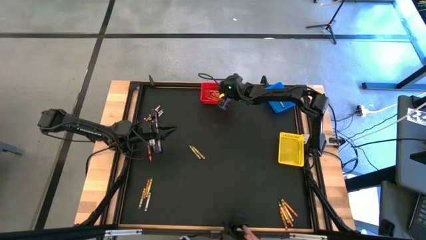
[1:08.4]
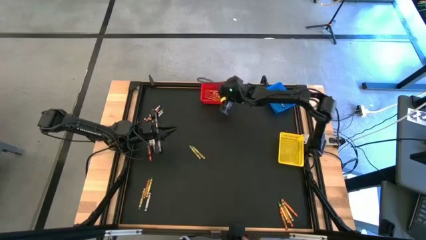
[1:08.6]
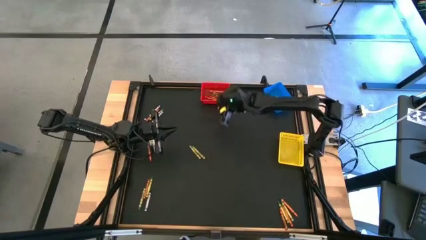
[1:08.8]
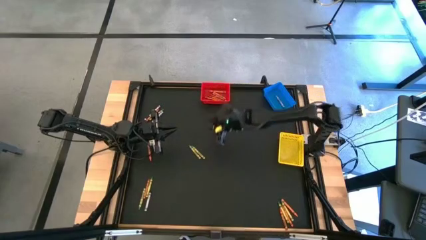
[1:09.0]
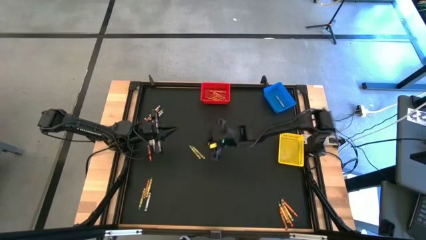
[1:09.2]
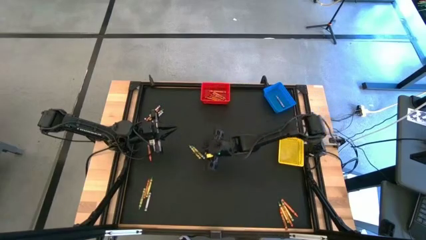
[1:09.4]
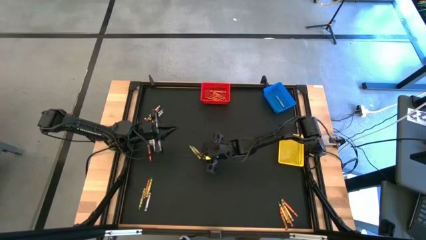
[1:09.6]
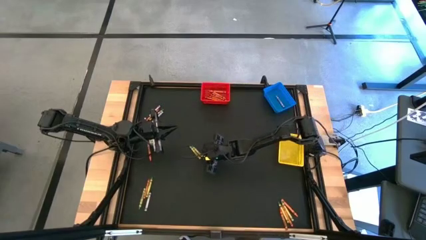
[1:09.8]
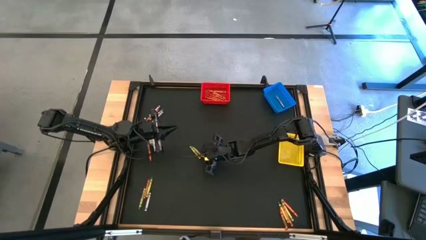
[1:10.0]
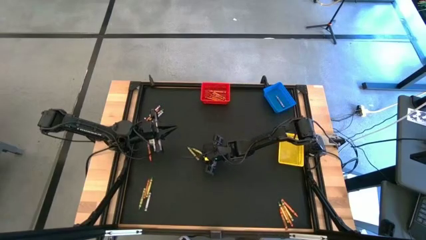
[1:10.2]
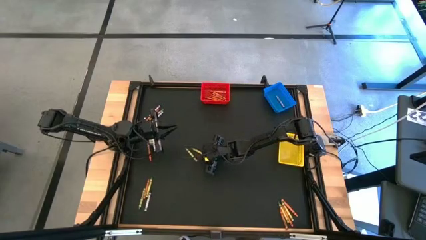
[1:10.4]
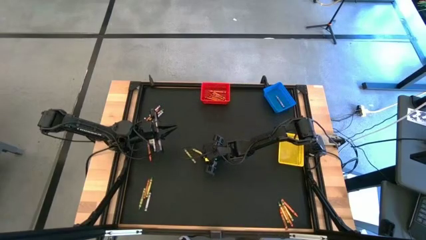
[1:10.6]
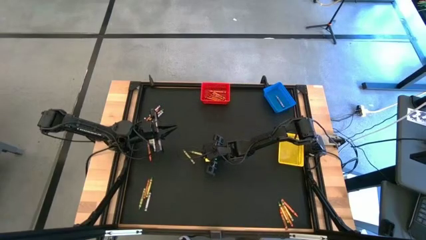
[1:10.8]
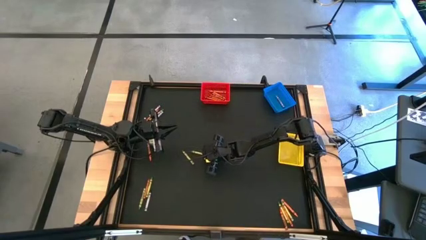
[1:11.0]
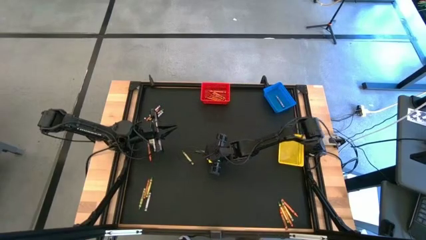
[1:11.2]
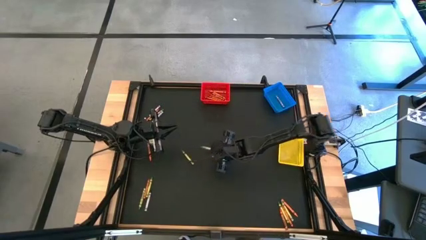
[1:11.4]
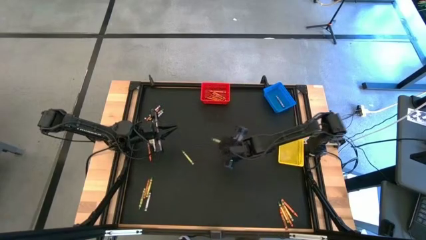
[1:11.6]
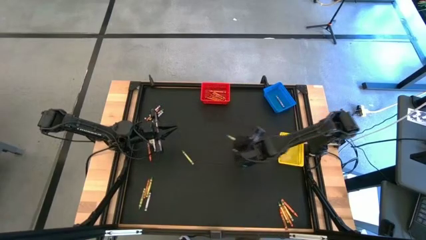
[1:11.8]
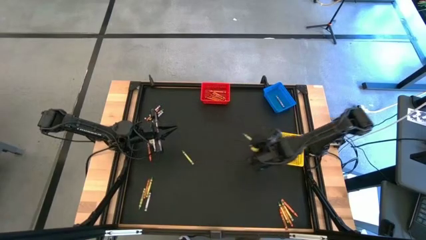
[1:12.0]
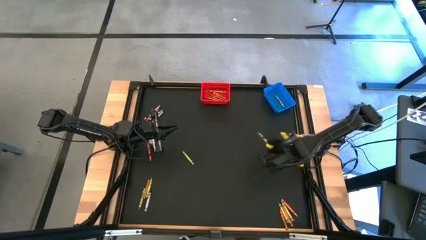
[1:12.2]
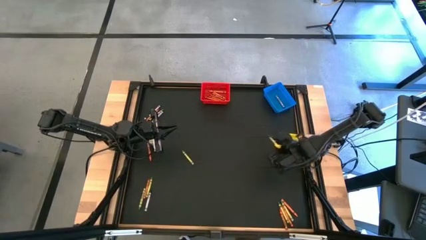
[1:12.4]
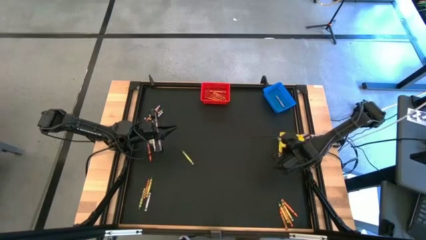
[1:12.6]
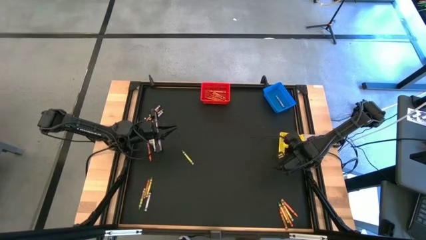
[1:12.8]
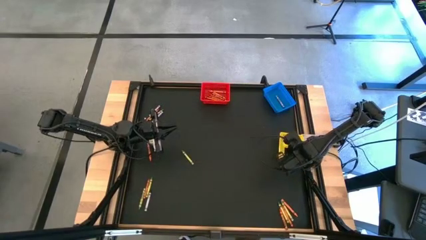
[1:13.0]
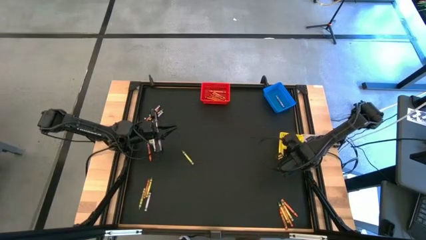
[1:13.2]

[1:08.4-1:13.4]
Task: Sort crayons
Put the green crayon into the yellow bin

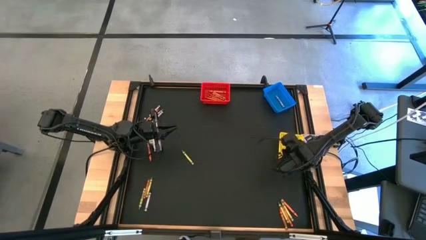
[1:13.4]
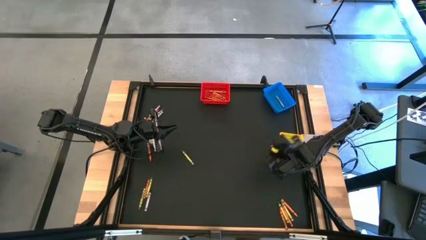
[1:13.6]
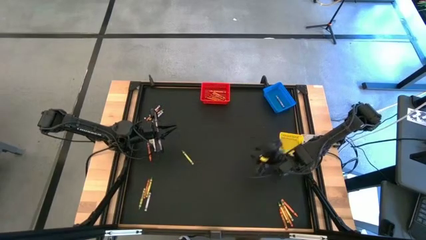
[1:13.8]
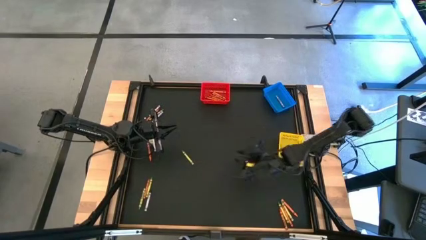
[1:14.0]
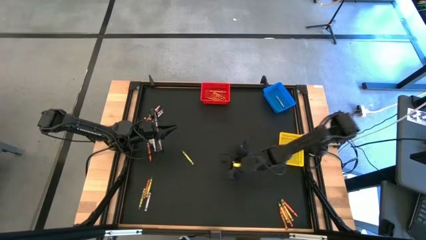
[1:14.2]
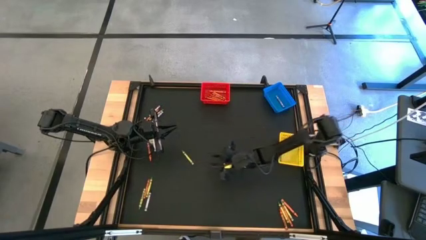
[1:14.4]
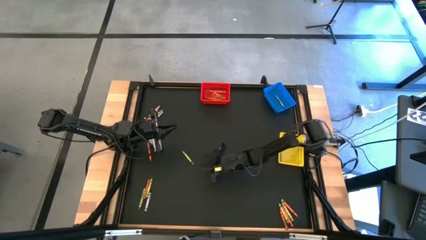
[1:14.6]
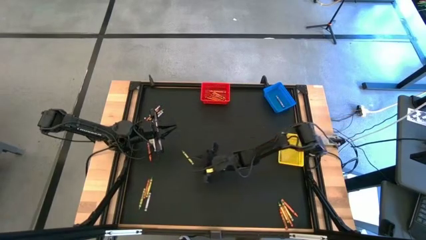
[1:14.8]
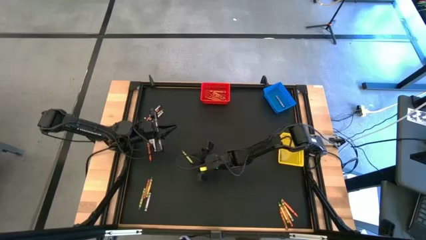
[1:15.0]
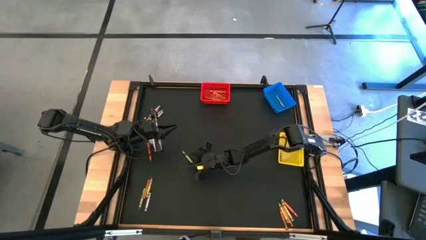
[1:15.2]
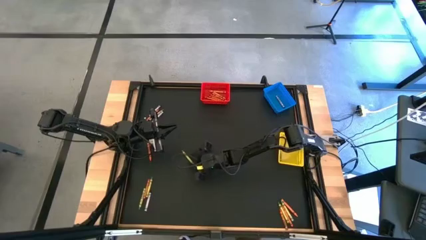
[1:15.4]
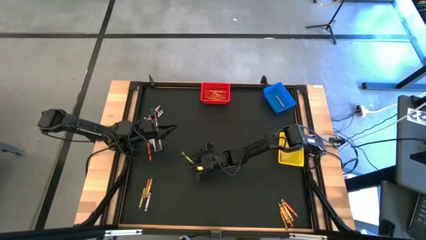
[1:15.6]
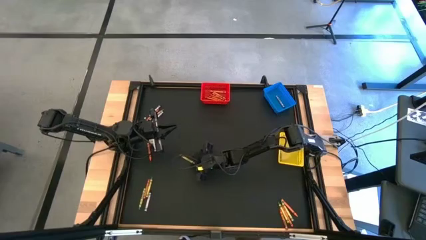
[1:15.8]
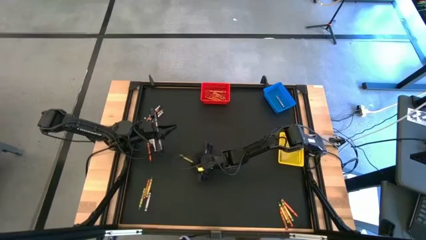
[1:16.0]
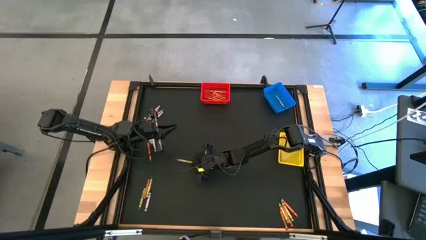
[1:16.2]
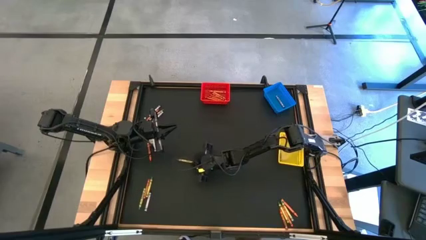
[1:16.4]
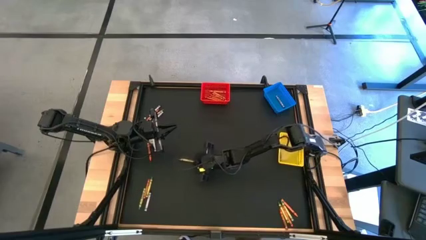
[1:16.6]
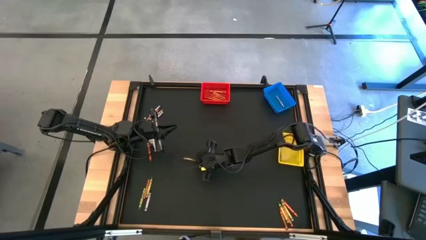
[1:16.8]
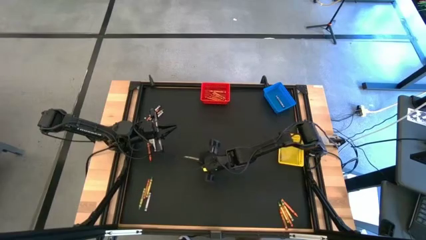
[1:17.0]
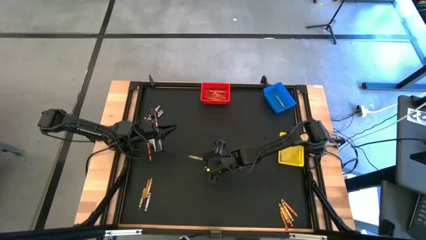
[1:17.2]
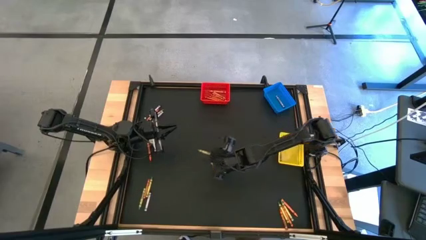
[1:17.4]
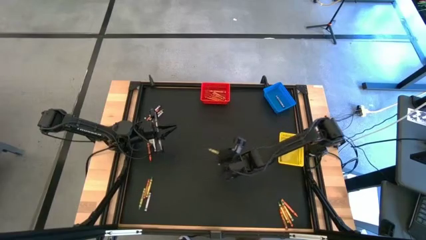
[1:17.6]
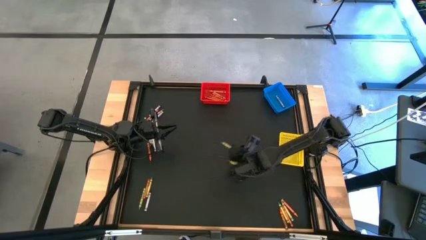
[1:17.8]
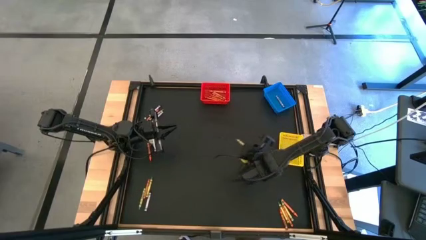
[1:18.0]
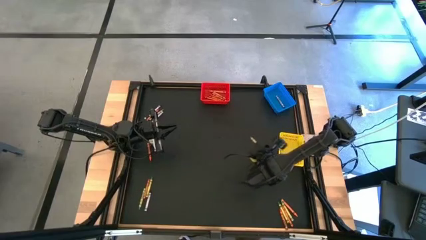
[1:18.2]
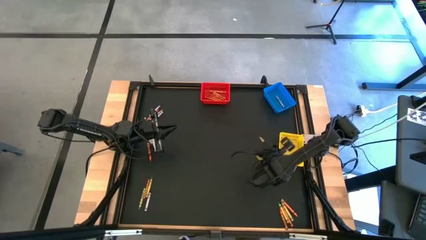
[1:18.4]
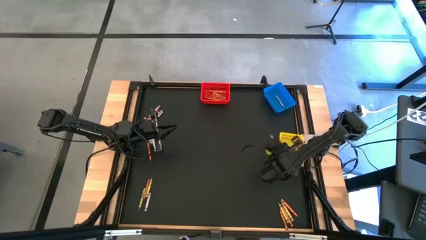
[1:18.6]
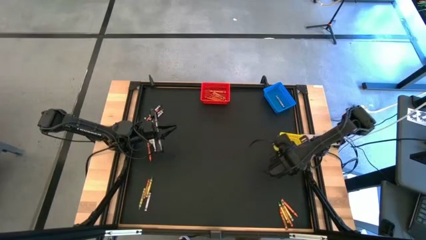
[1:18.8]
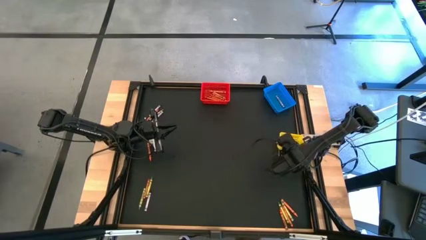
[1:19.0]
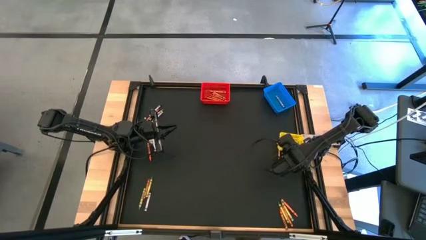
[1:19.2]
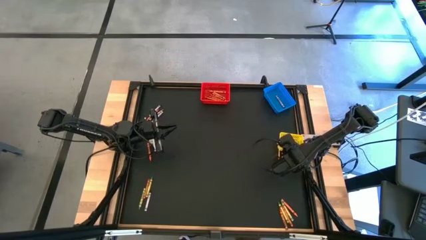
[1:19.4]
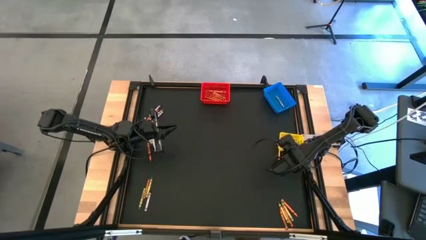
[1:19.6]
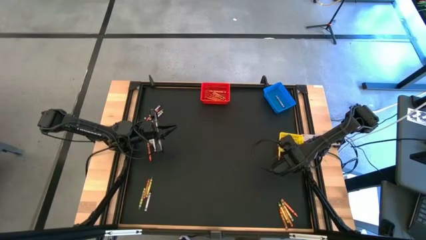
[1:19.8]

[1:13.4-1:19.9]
Put the green crayon into the yellow bin

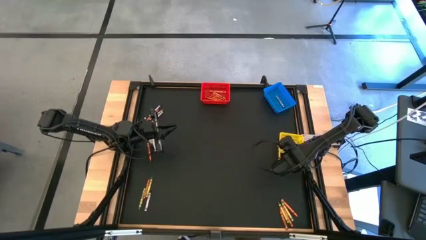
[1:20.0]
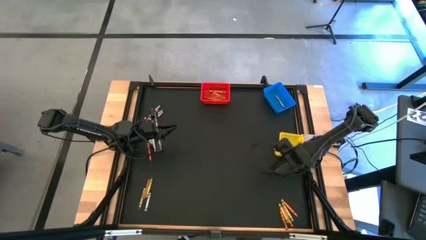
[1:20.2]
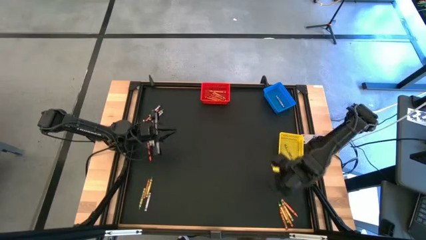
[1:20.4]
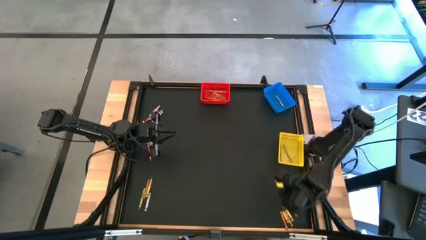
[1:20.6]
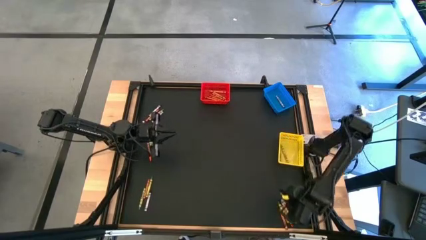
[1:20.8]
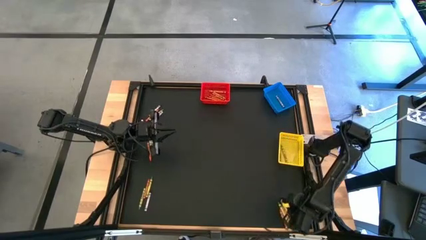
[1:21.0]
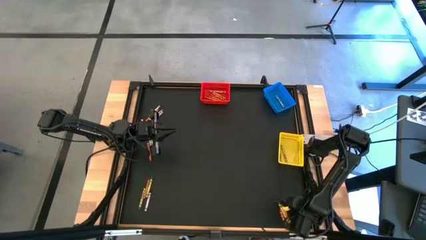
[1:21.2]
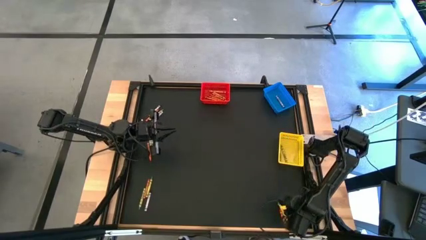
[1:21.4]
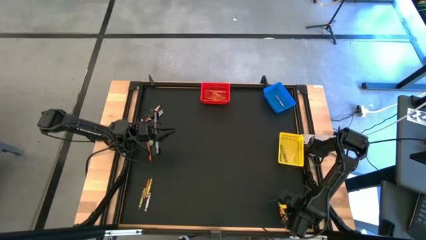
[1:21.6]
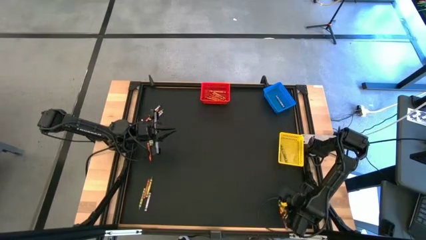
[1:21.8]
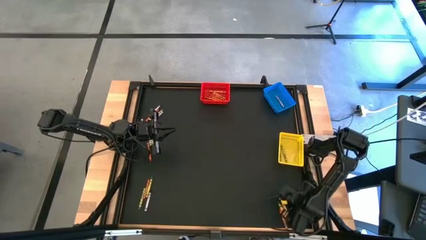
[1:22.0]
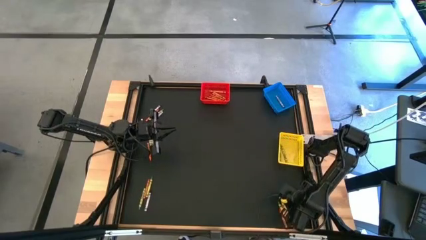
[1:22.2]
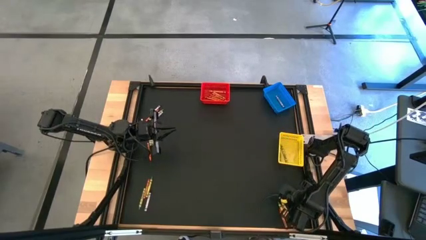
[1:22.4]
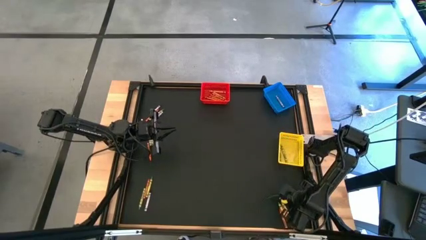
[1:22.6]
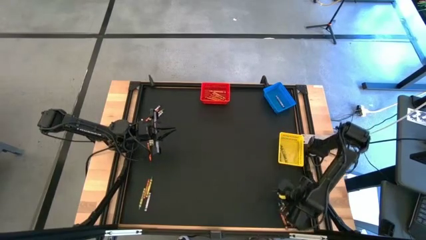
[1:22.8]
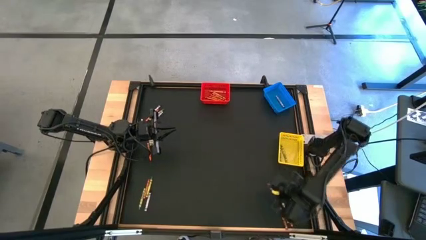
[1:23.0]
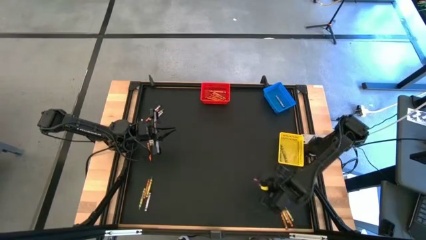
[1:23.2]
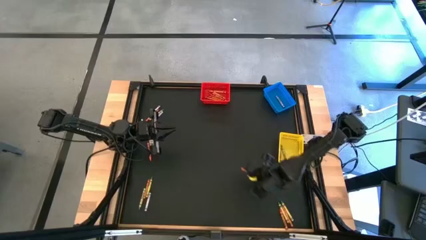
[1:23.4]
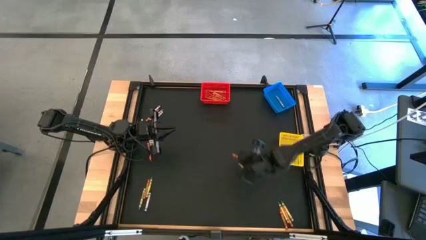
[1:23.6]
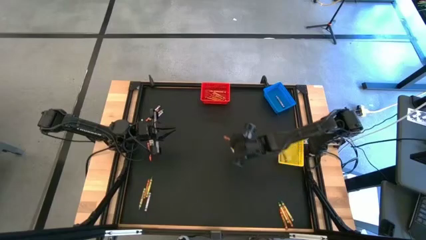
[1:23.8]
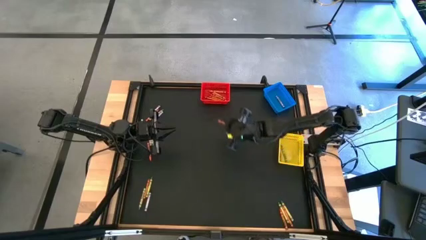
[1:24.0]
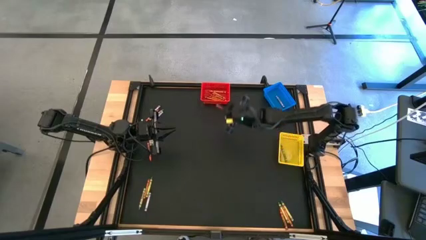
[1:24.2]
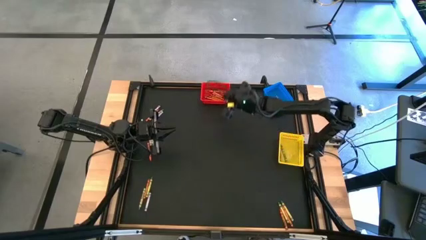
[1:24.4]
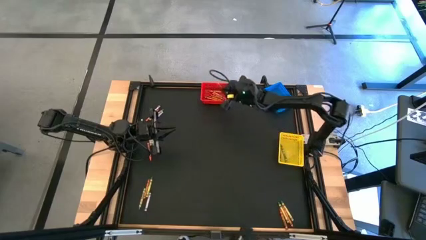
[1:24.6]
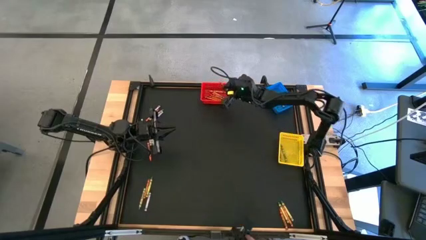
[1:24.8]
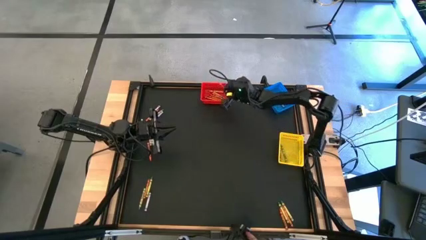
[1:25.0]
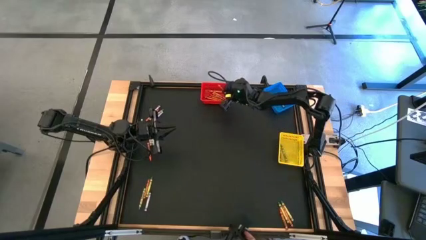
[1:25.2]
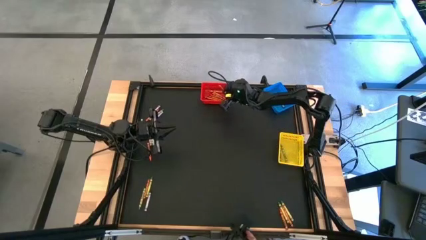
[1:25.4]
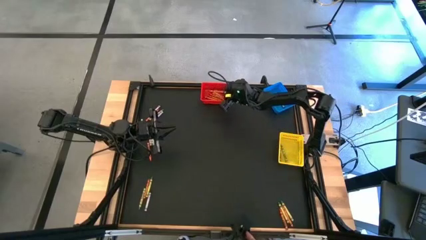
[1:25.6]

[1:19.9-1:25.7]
Put the orange crayon into the red bin
